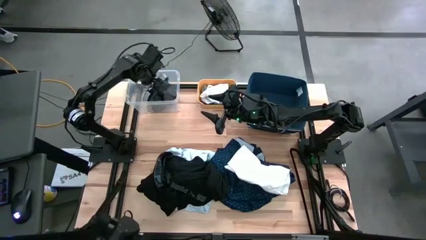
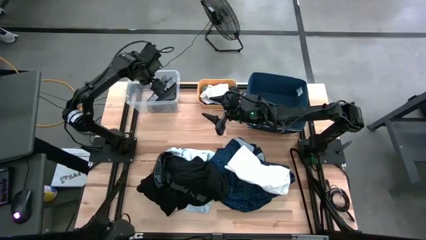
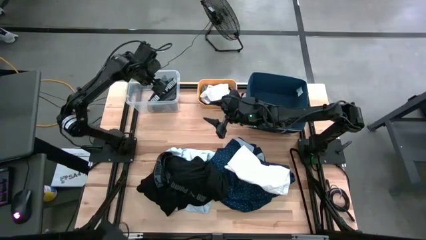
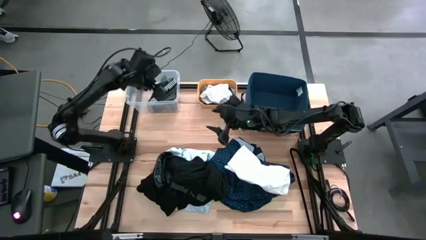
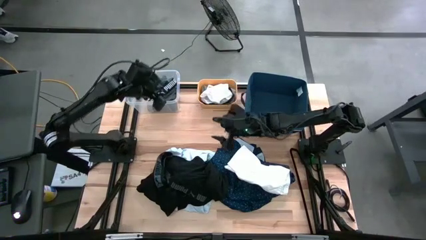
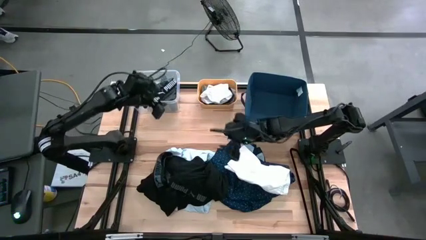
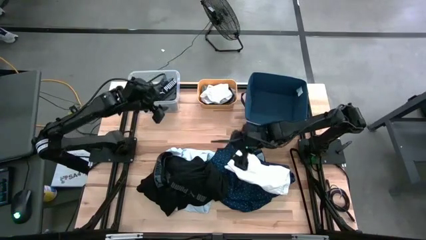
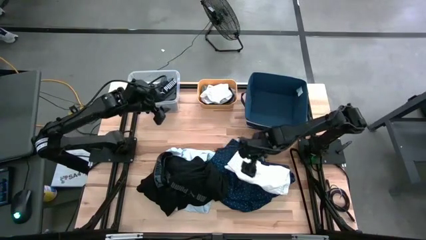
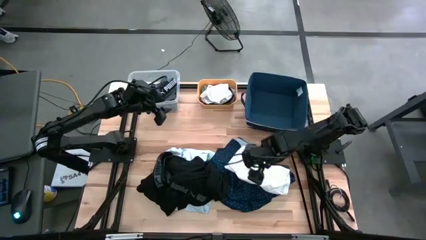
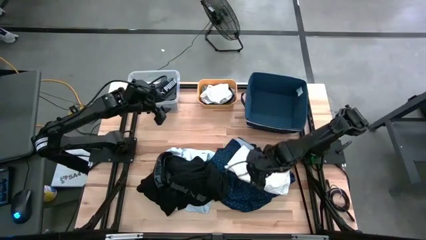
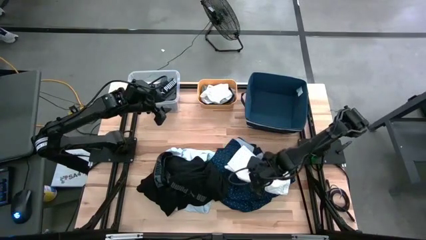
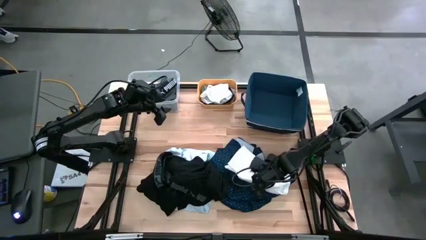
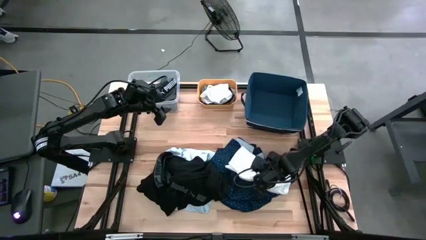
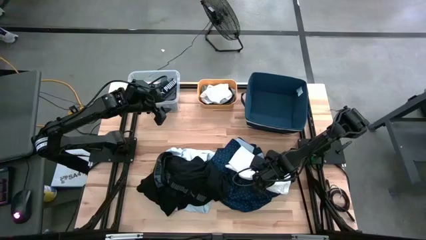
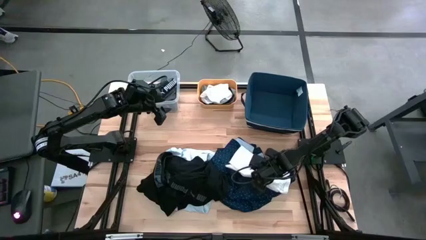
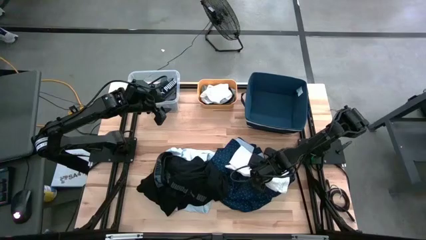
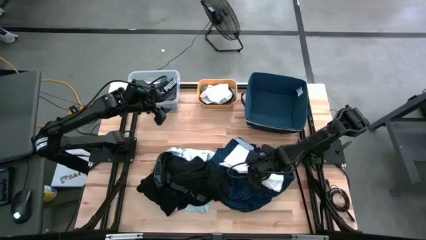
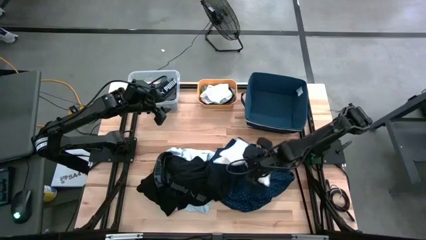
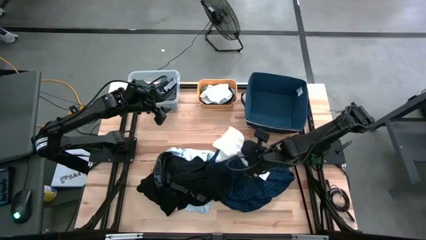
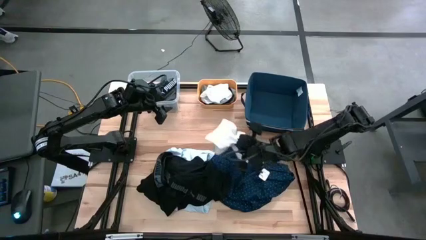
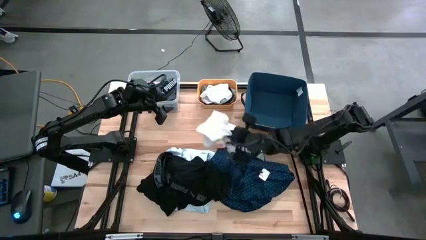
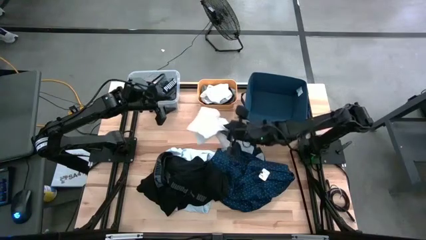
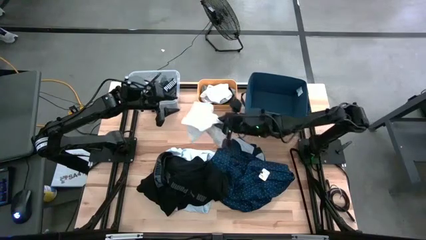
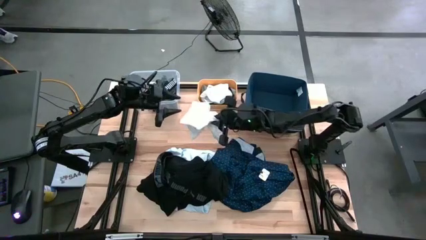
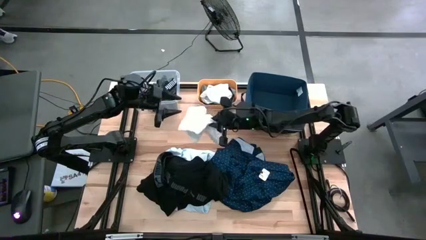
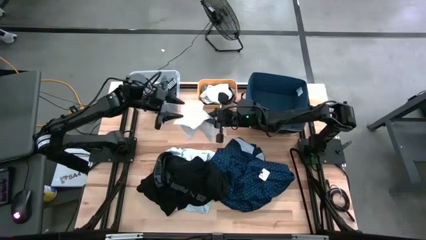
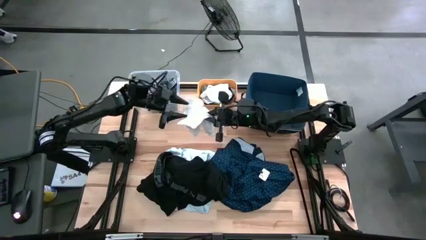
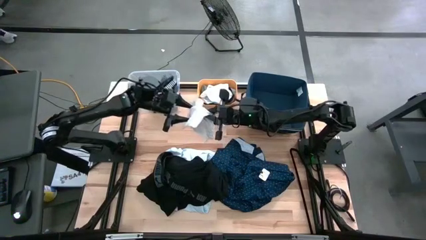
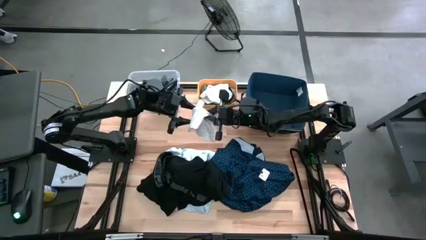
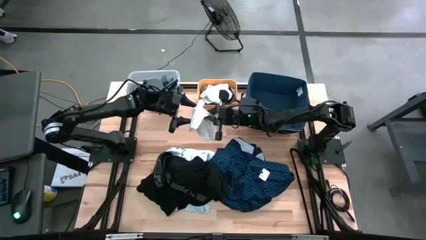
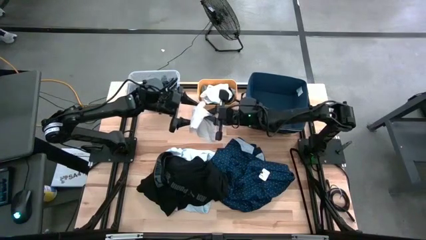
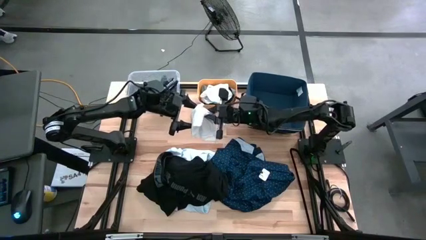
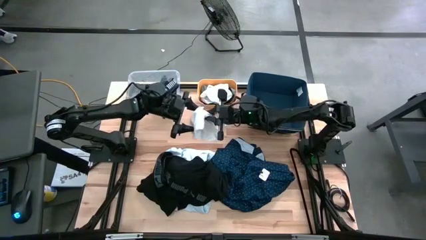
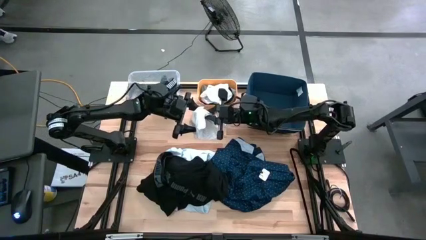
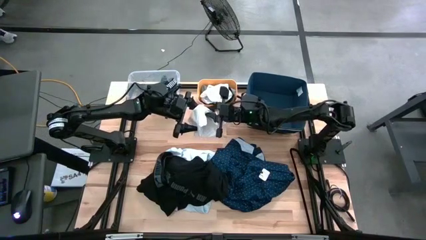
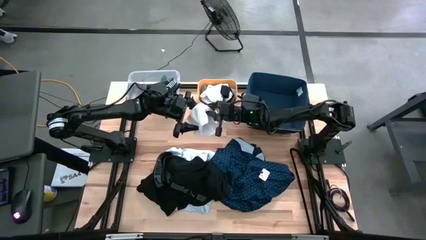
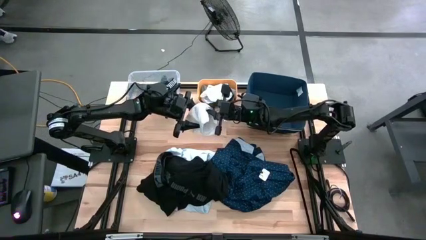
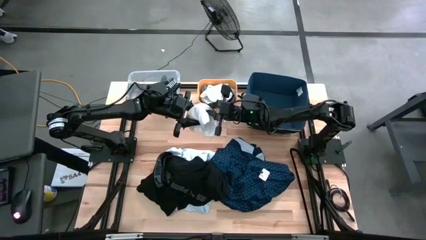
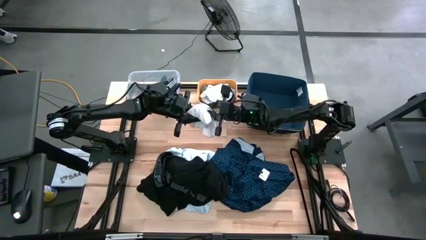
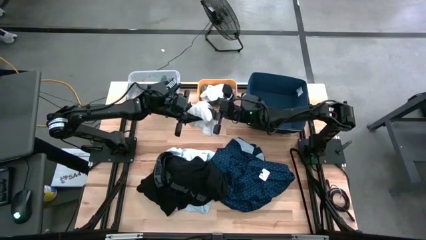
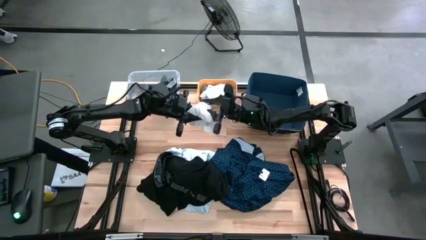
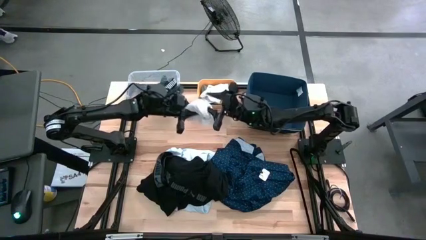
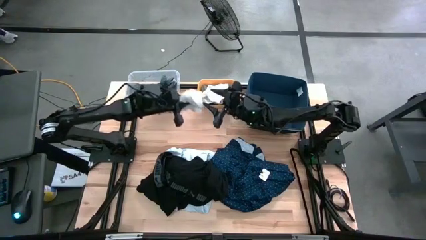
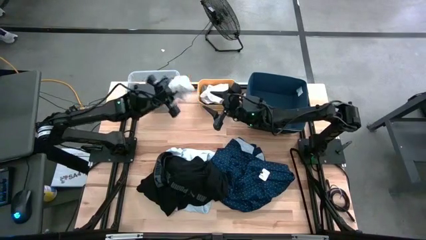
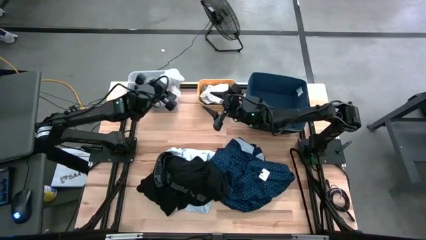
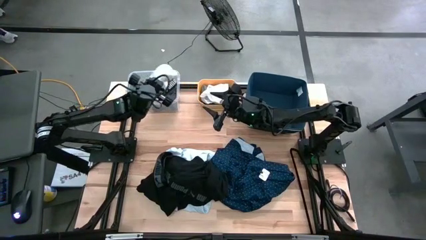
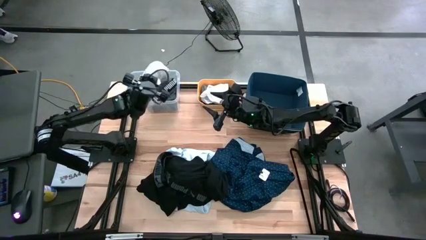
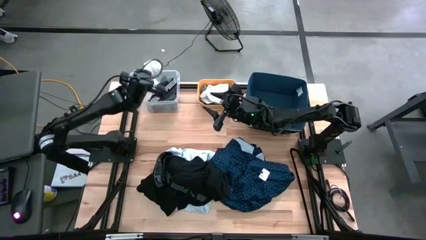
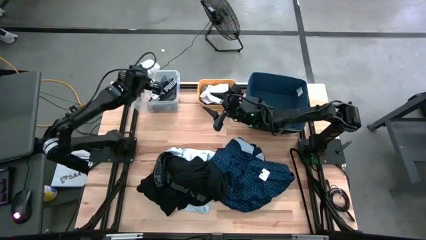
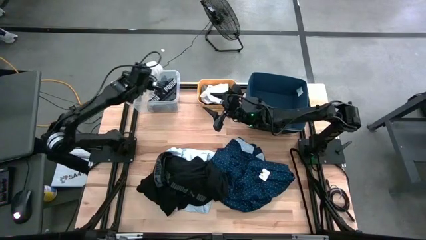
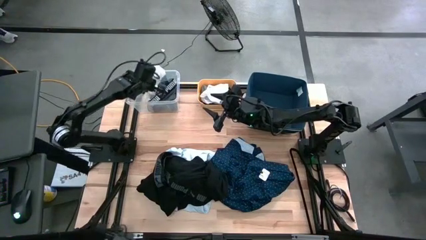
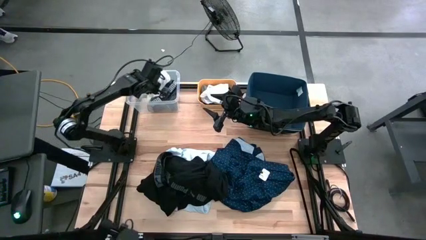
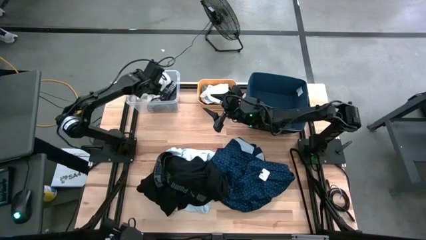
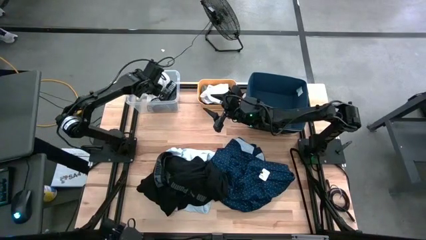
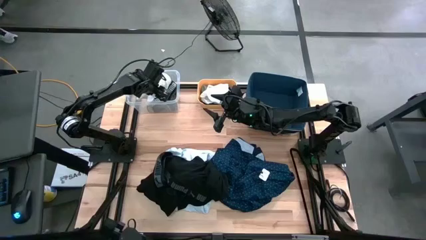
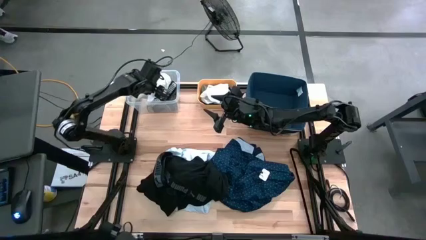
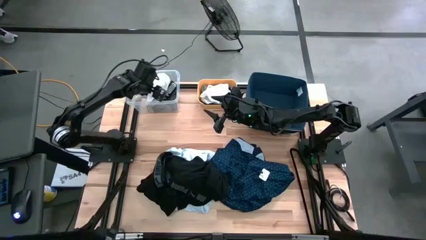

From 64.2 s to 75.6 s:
Task: Pick & Place Cloths
Put the white underwear into the transparent bin

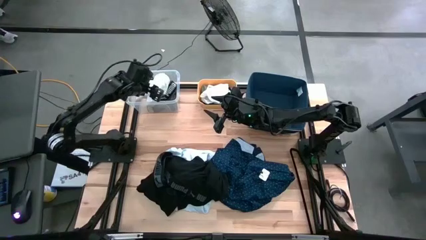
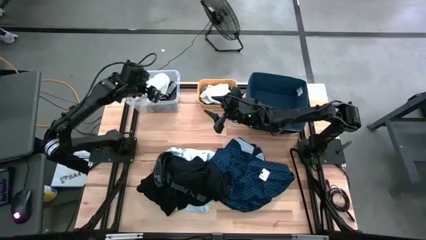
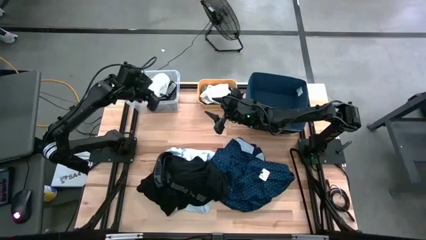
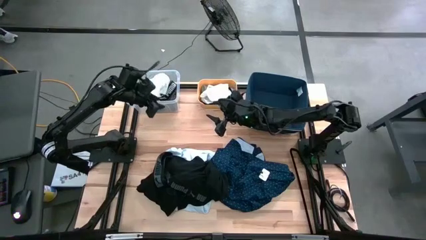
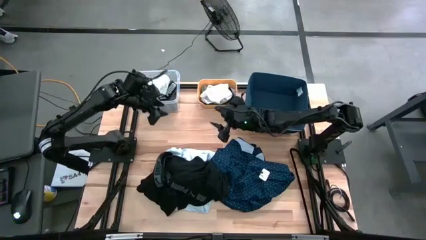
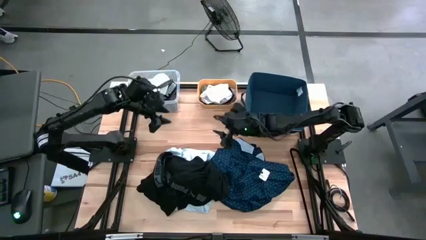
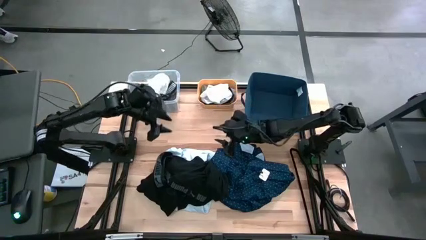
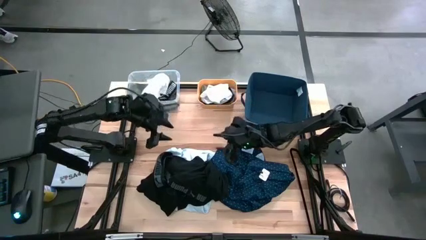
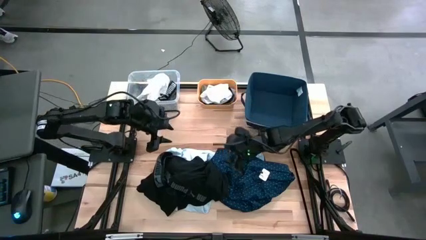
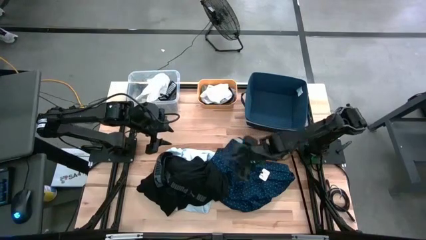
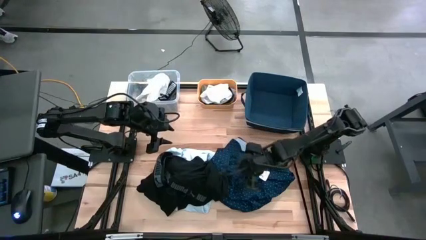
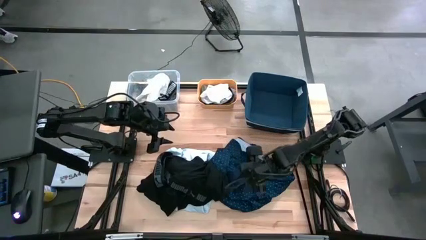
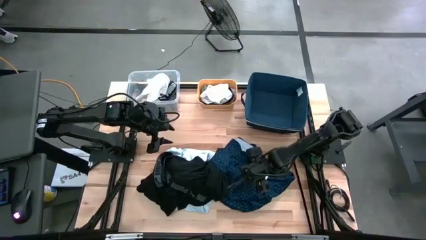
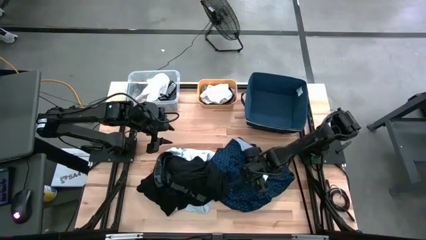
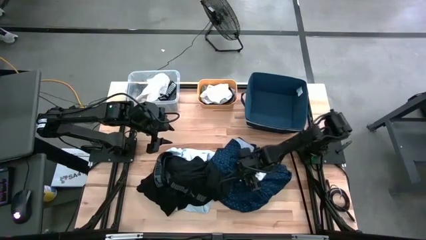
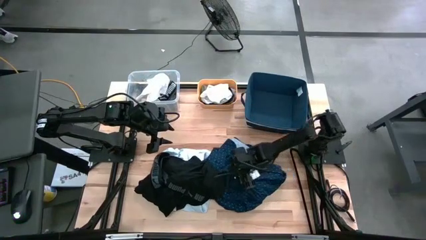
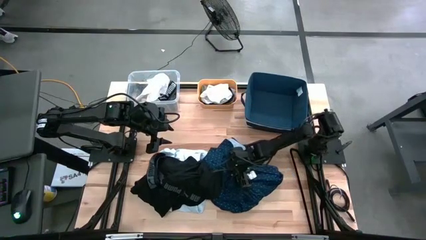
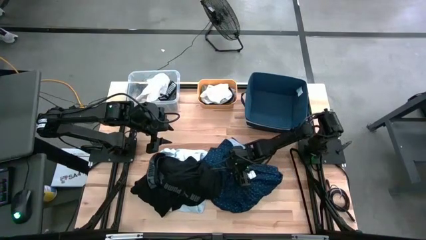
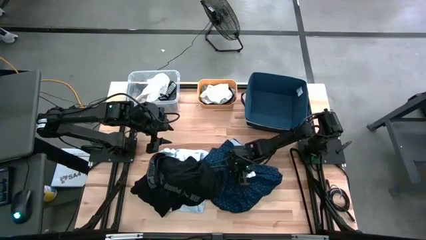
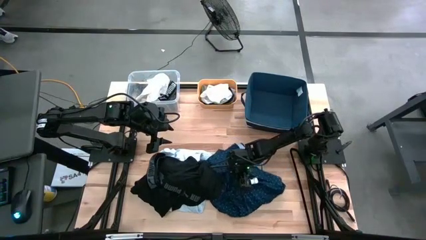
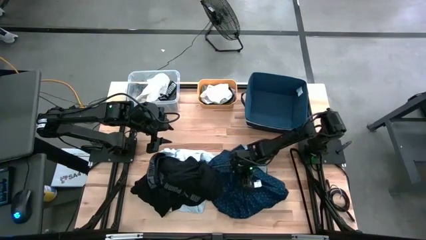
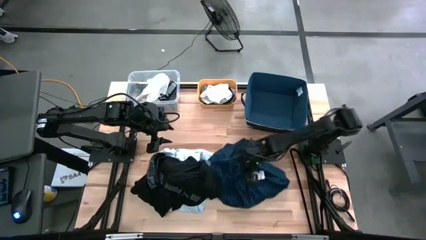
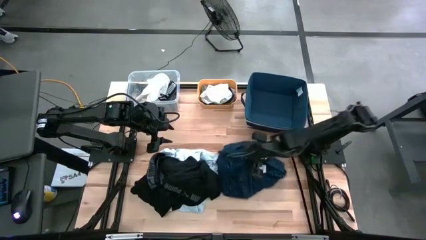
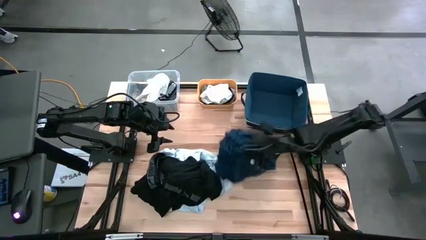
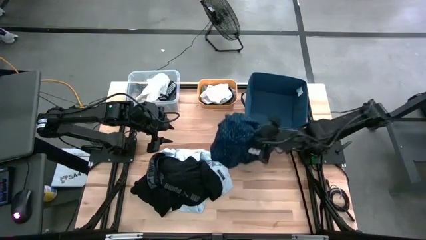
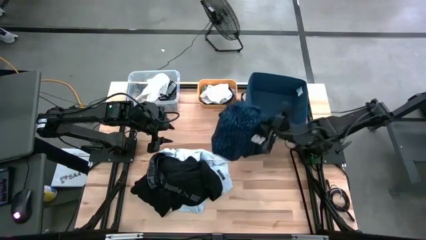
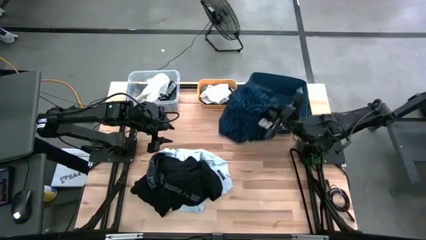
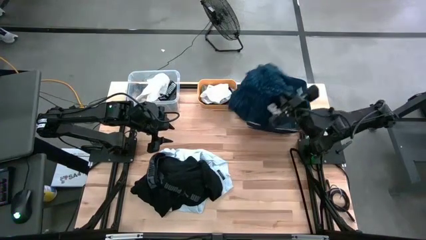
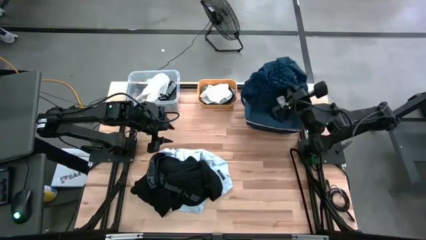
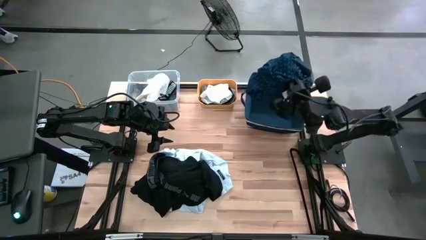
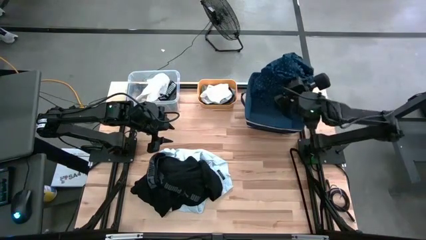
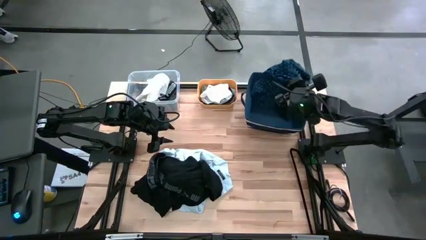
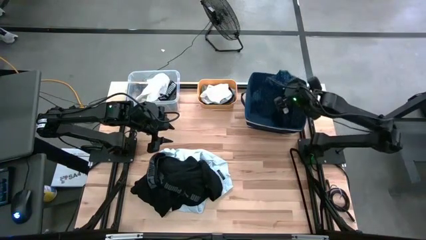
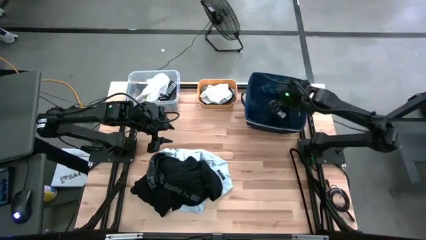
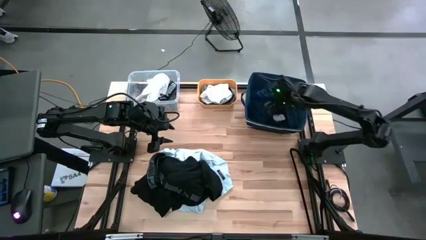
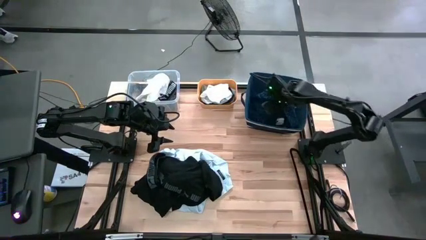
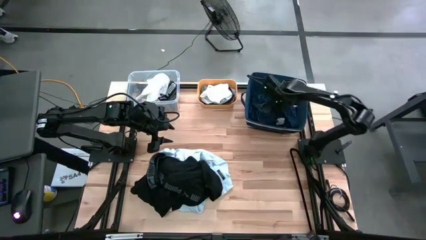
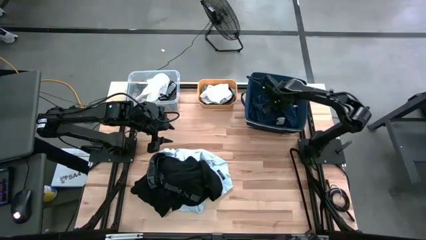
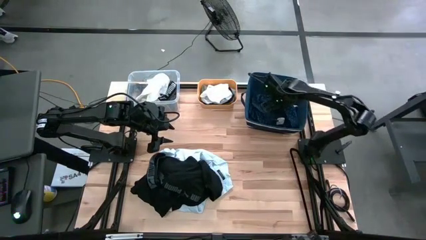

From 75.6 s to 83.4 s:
Put the blue patterned shirt into the blue bin
